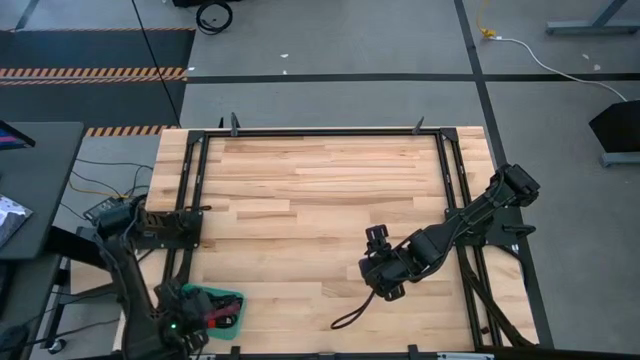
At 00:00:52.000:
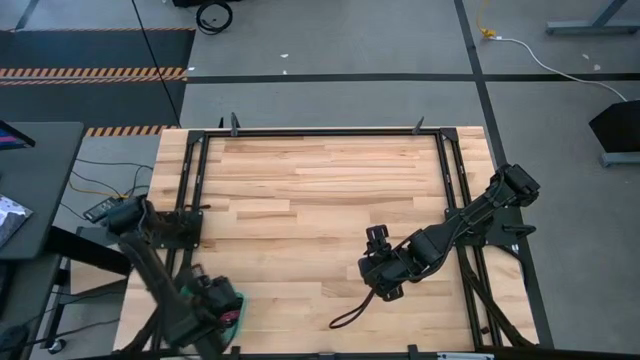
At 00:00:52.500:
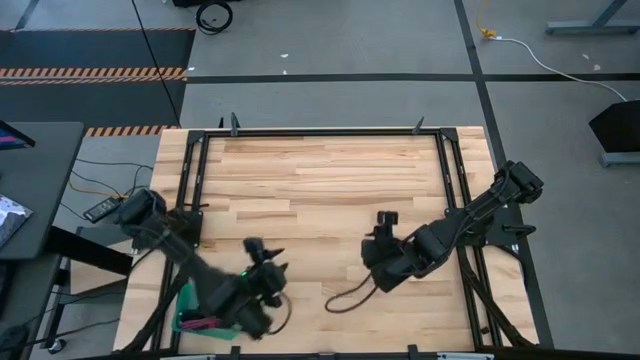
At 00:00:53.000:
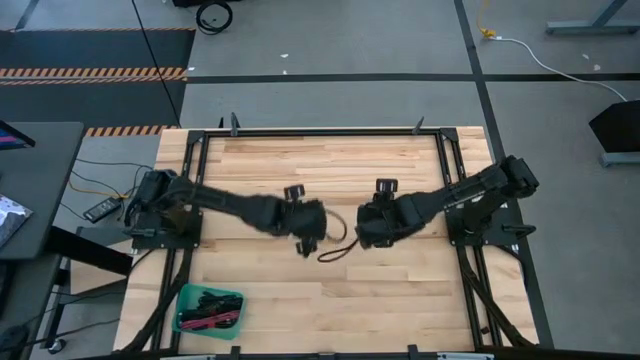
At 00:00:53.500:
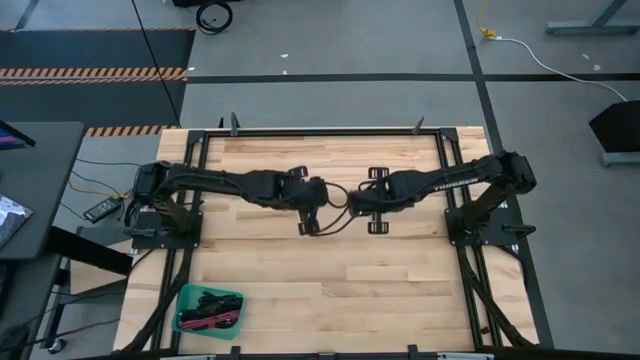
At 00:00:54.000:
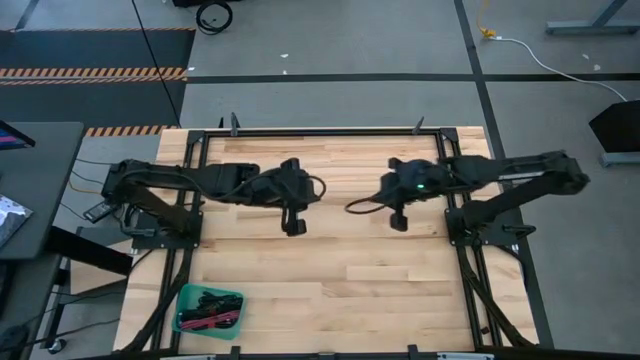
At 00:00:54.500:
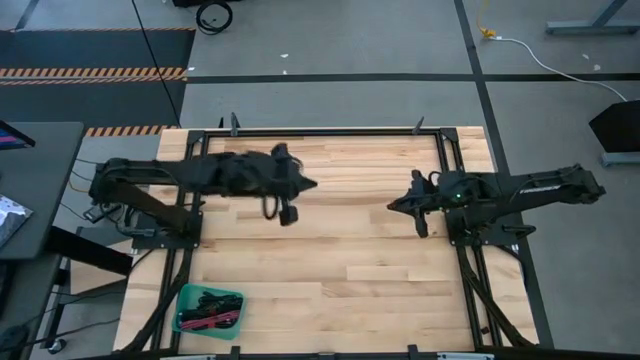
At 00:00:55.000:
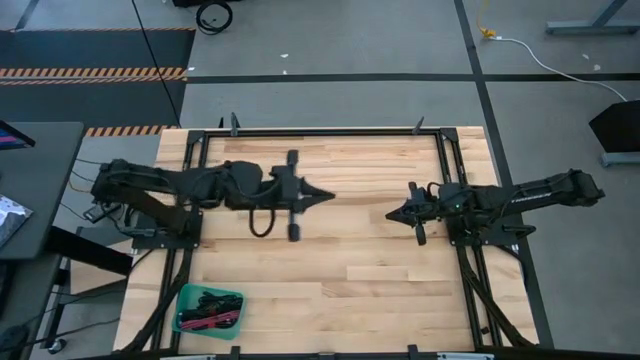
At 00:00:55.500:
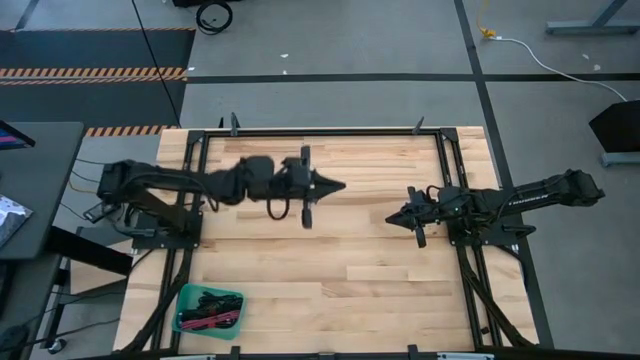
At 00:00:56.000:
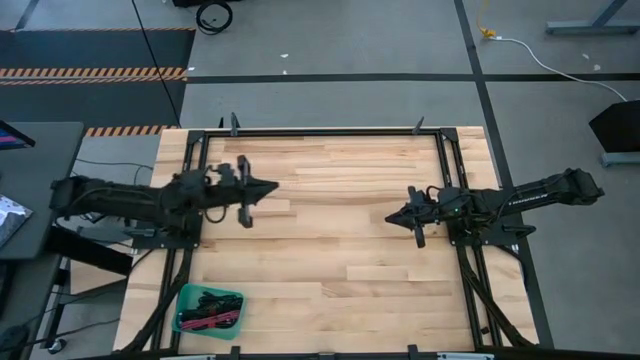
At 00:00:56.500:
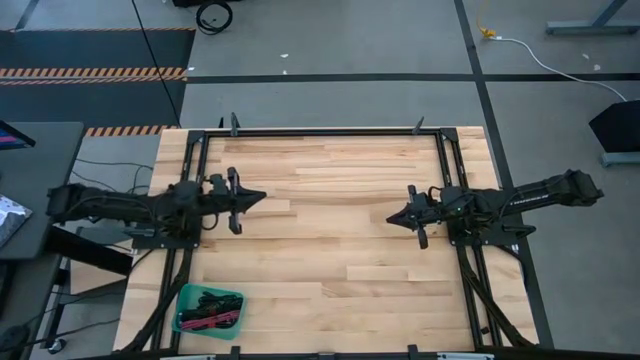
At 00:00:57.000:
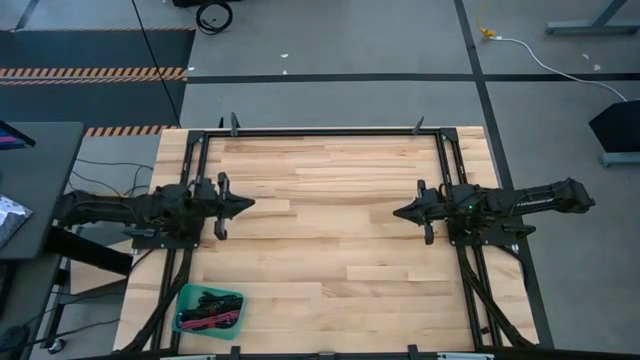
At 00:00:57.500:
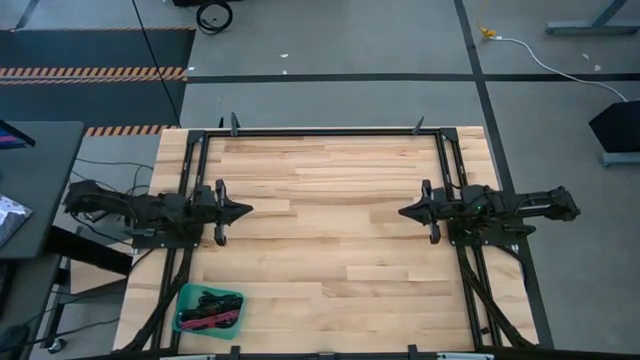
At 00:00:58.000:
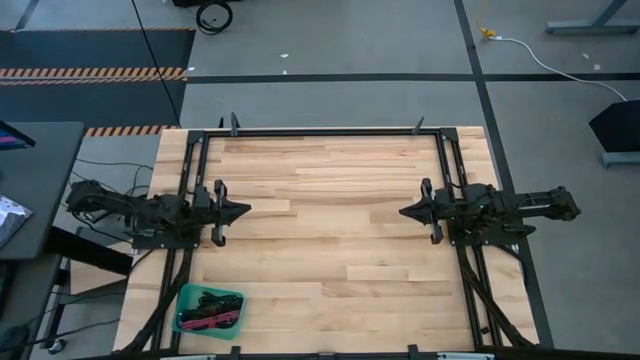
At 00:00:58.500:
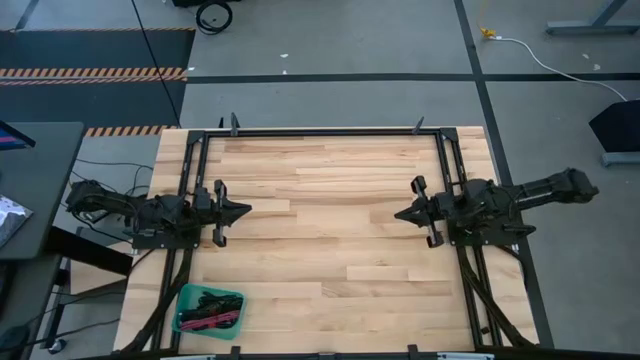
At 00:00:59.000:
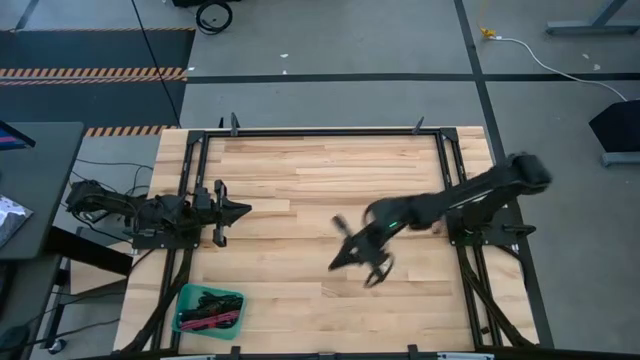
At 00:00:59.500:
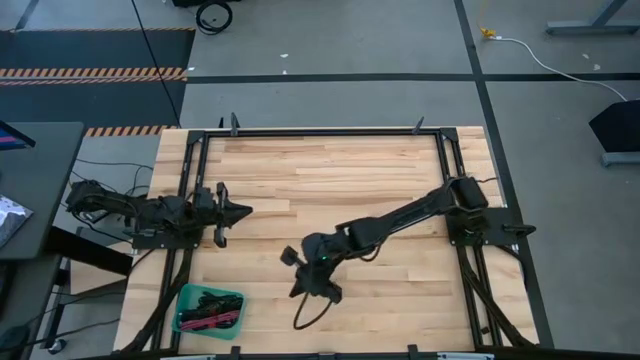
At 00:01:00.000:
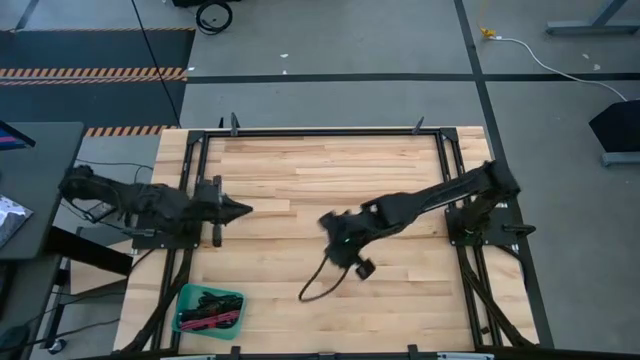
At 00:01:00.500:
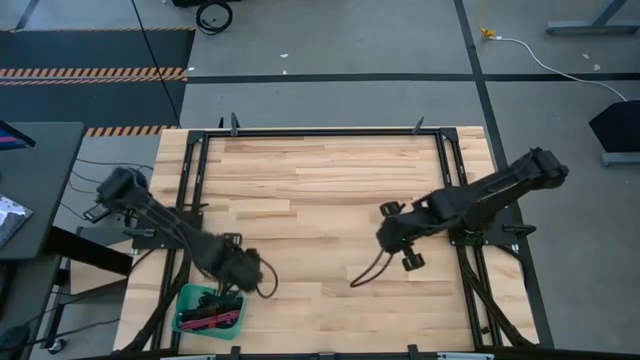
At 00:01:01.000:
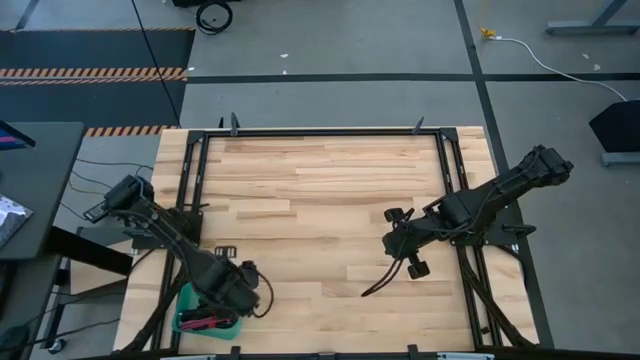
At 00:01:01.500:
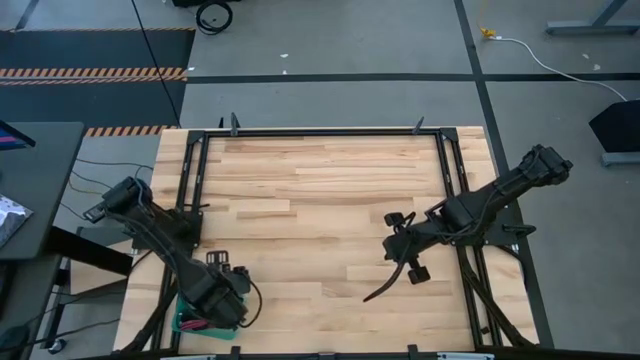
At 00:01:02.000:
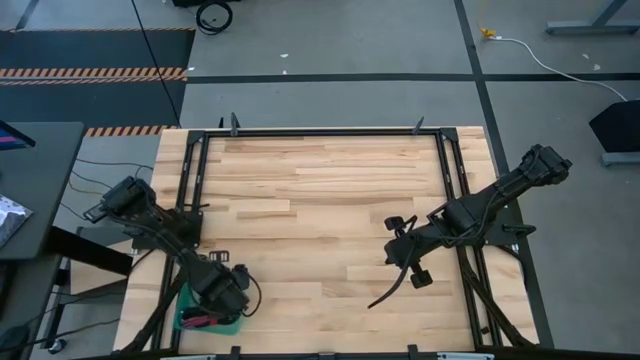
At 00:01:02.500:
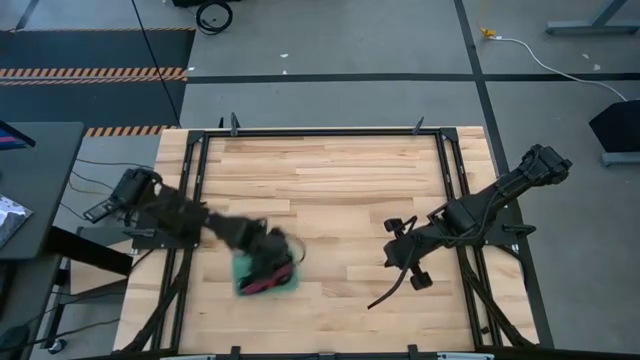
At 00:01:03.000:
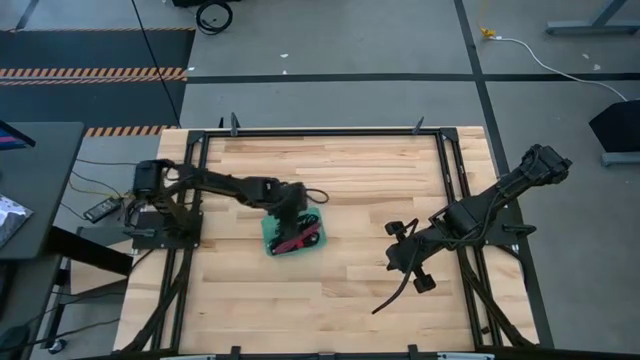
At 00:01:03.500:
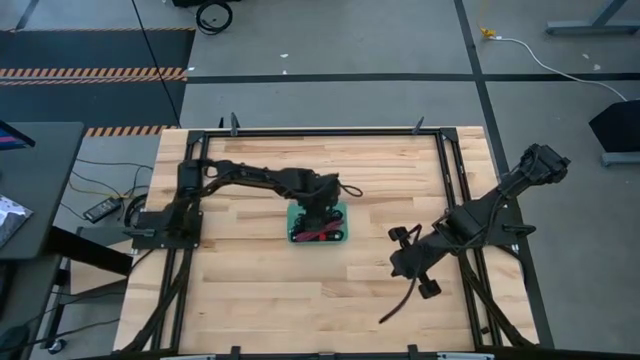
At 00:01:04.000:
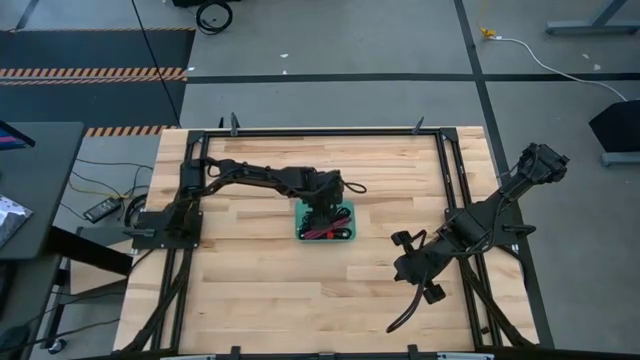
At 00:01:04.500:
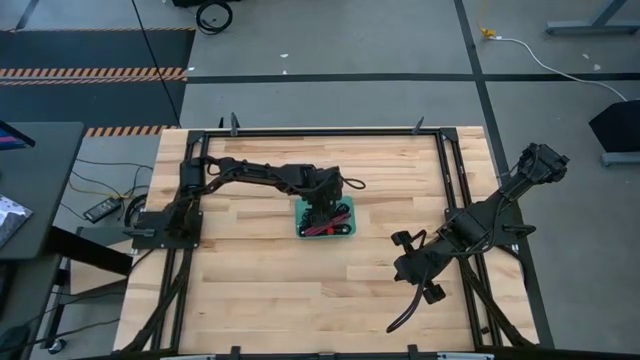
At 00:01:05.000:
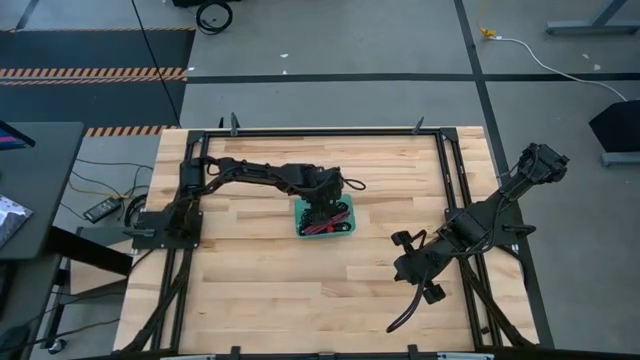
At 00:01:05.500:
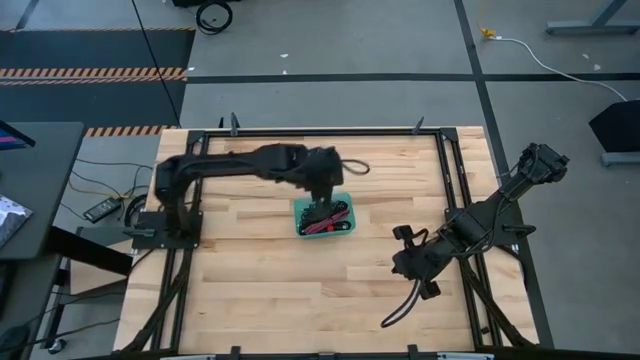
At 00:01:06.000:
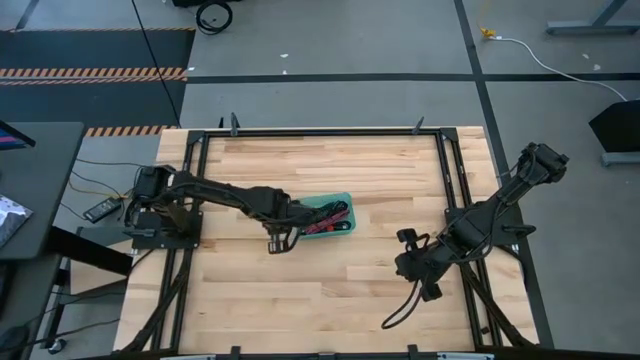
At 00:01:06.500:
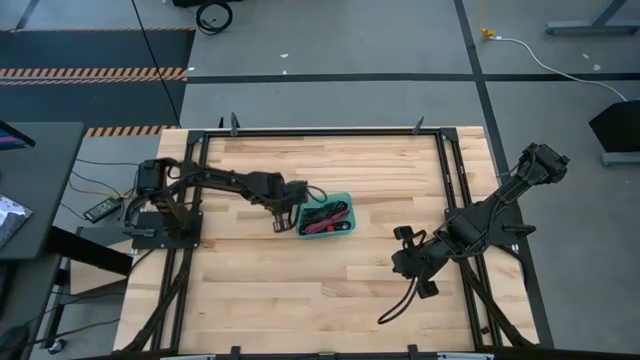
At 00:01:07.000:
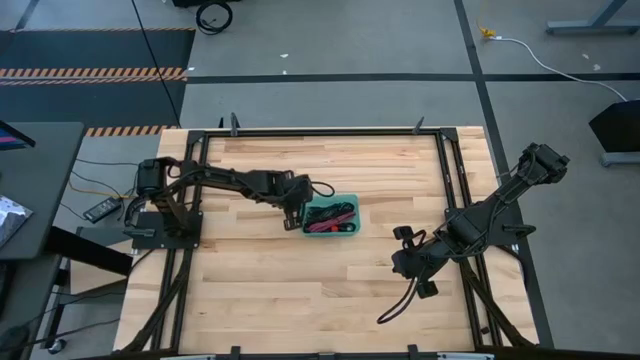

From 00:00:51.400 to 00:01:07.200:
Task: Pick and place USB-C Cables
Move the green bin to the center of the table

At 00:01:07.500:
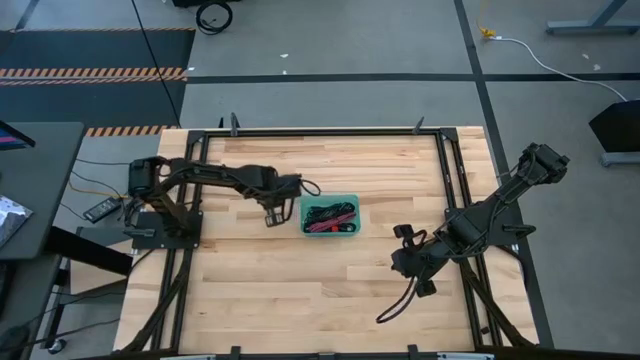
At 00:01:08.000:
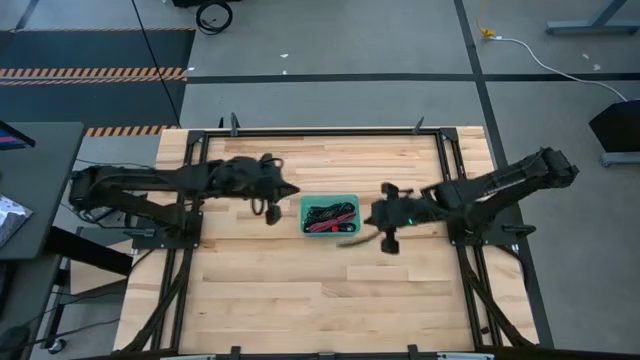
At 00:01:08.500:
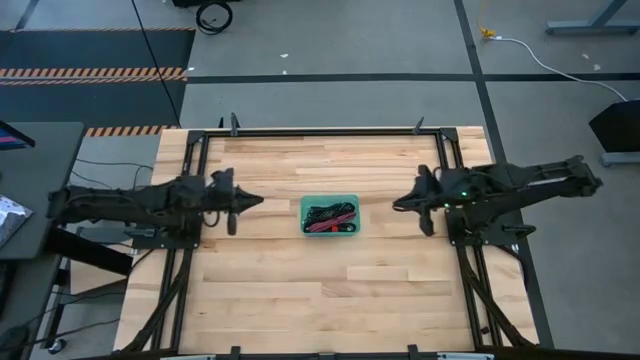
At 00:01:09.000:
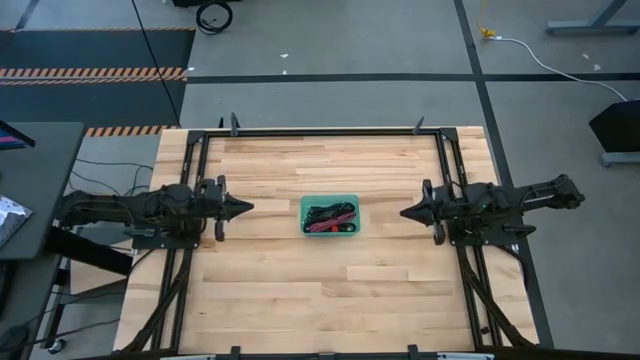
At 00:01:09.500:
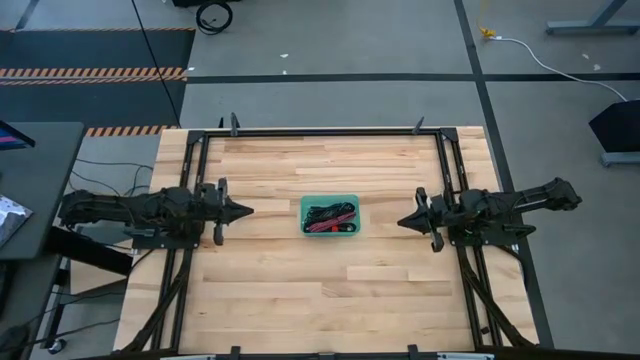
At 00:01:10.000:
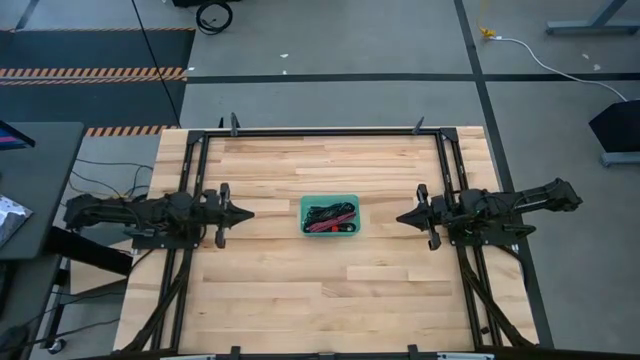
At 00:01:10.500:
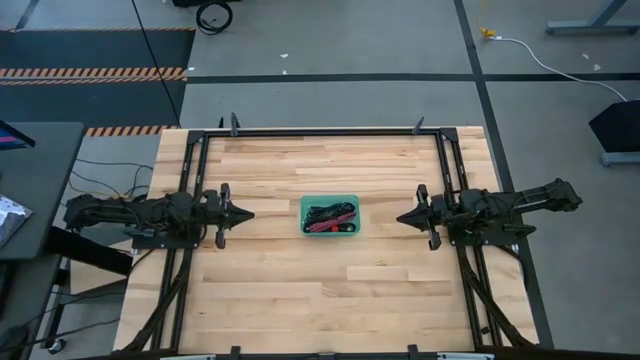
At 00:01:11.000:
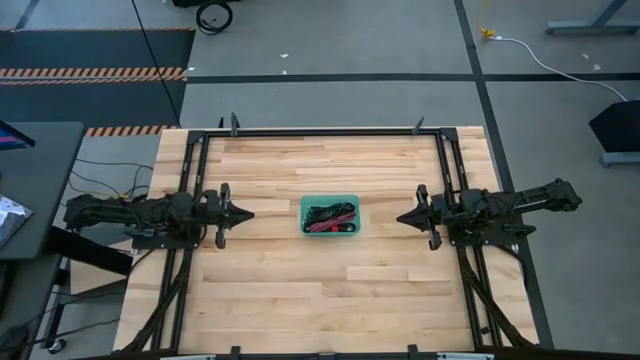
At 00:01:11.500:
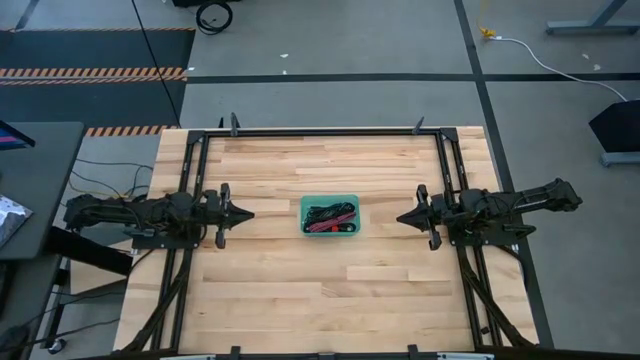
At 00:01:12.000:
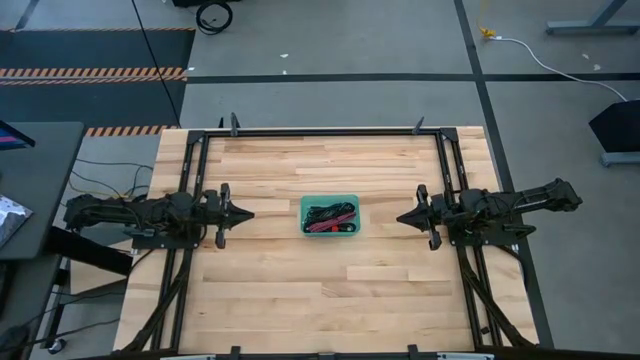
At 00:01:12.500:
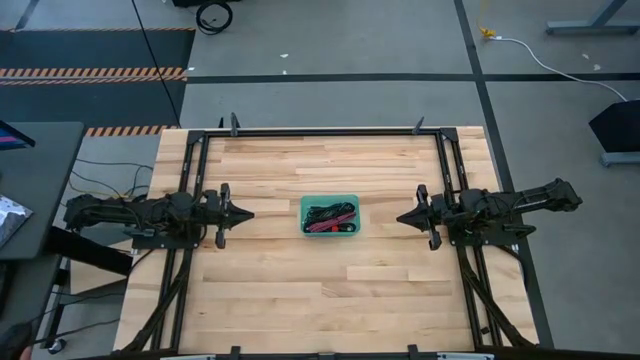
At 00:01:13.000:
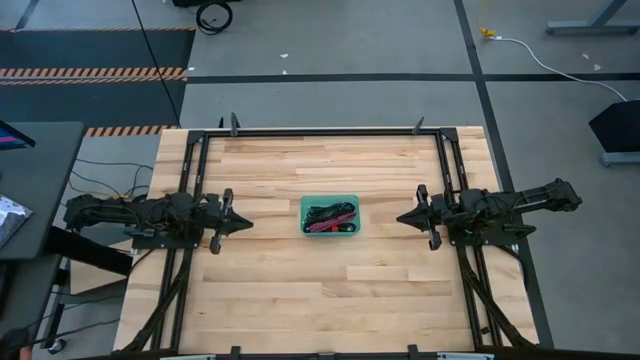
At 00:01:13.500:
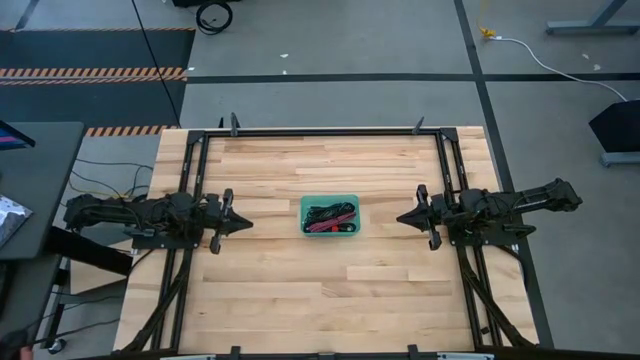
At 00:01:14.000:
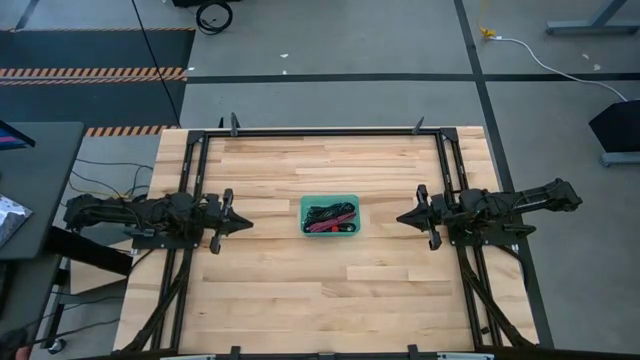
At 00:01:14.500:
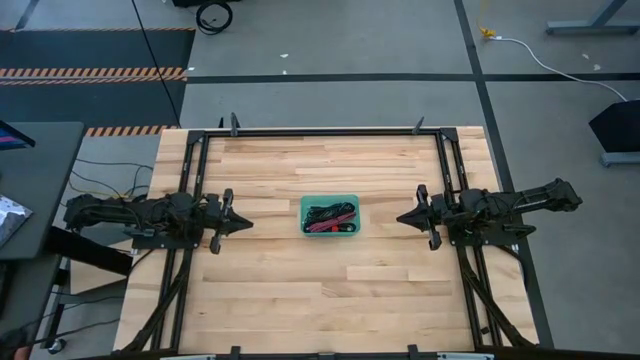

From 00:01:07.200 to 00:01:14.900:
Return to Home Position
